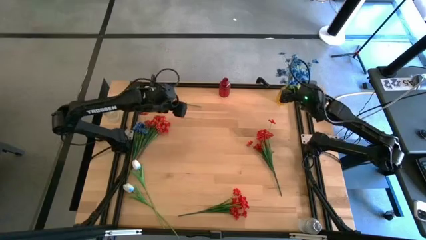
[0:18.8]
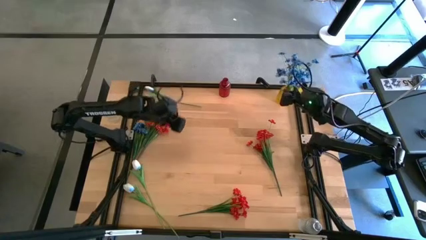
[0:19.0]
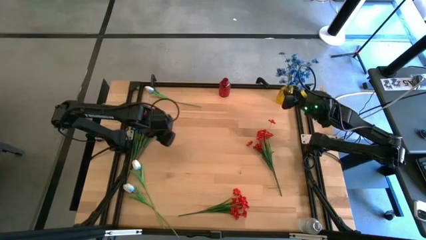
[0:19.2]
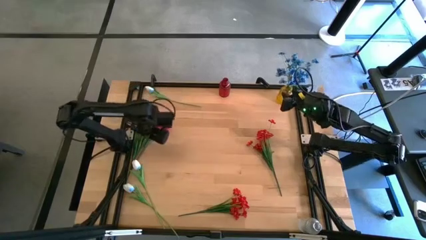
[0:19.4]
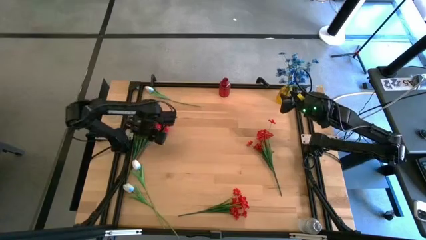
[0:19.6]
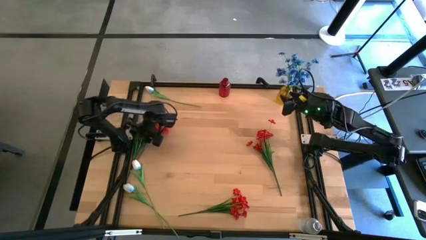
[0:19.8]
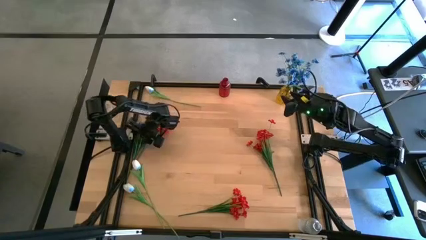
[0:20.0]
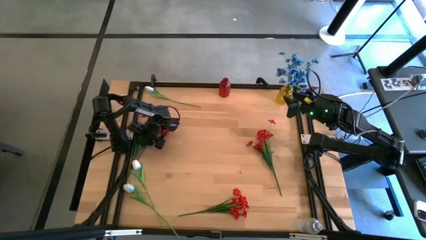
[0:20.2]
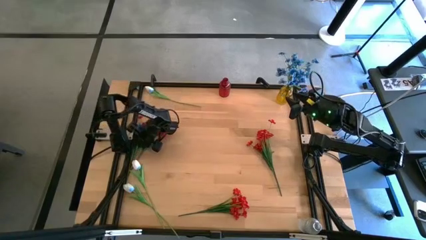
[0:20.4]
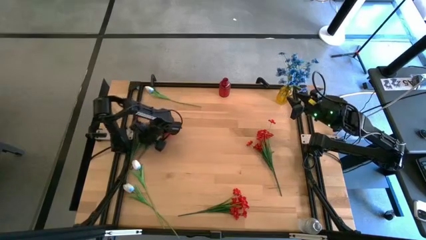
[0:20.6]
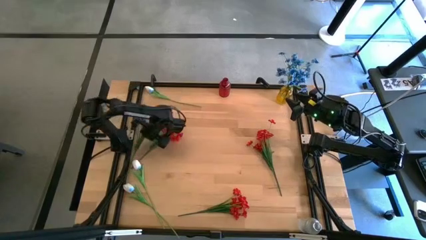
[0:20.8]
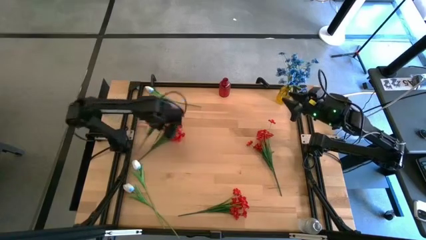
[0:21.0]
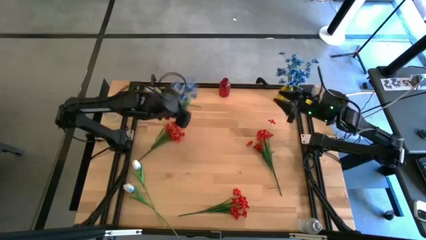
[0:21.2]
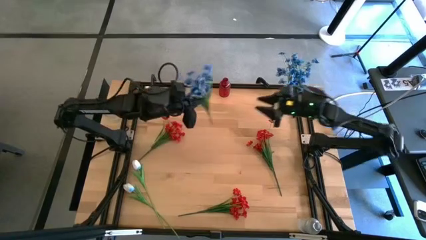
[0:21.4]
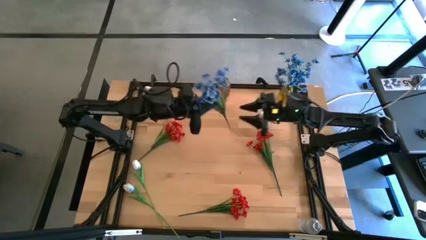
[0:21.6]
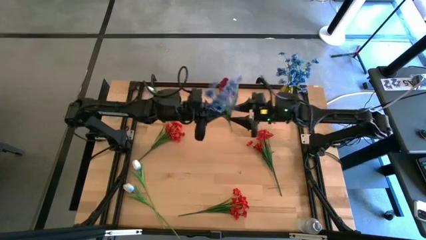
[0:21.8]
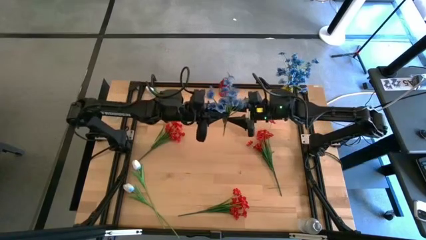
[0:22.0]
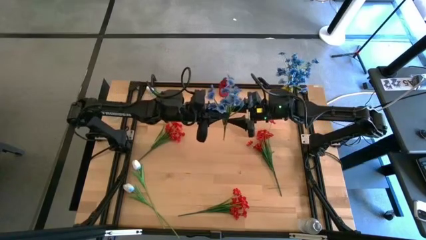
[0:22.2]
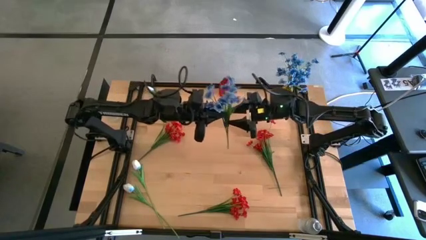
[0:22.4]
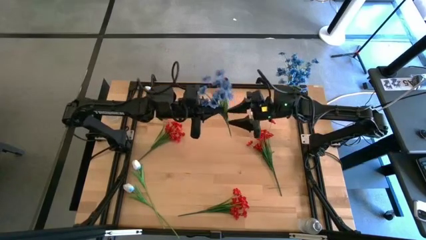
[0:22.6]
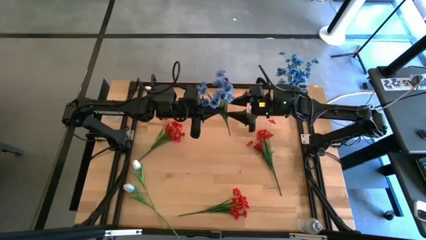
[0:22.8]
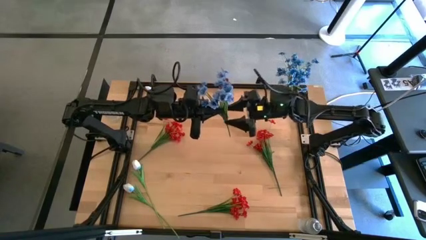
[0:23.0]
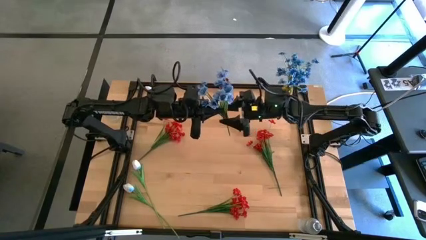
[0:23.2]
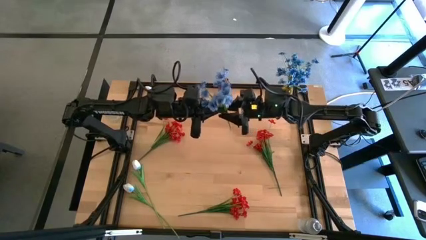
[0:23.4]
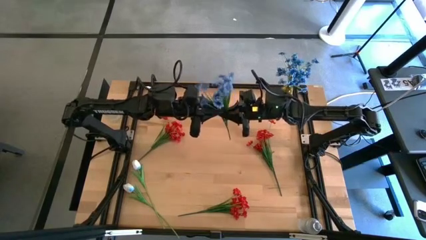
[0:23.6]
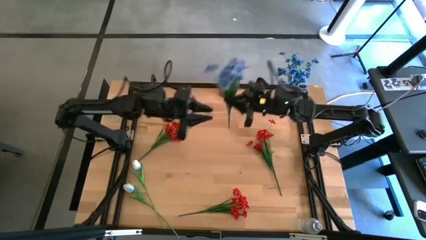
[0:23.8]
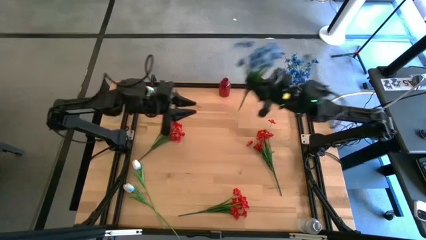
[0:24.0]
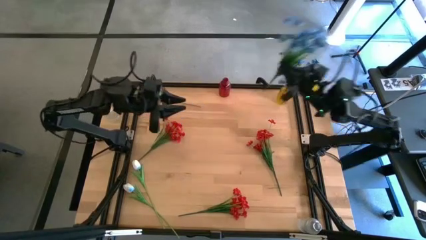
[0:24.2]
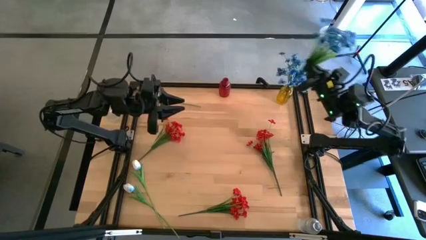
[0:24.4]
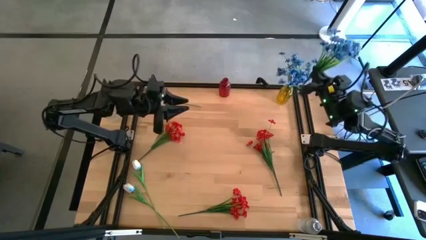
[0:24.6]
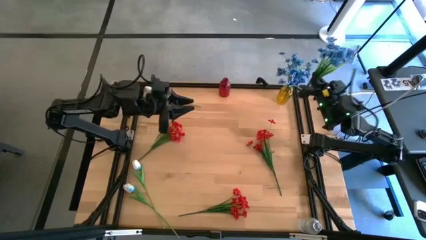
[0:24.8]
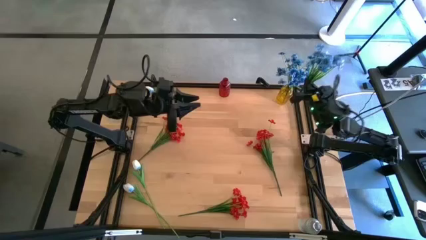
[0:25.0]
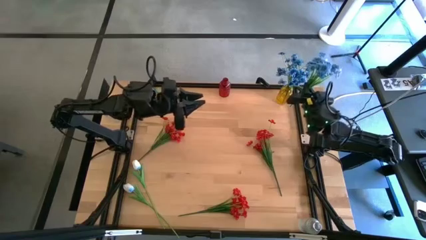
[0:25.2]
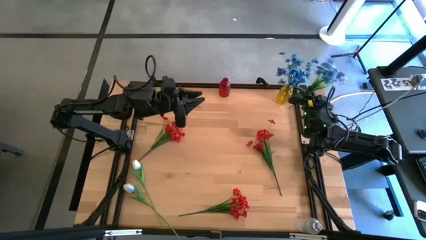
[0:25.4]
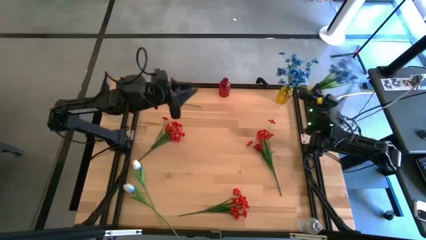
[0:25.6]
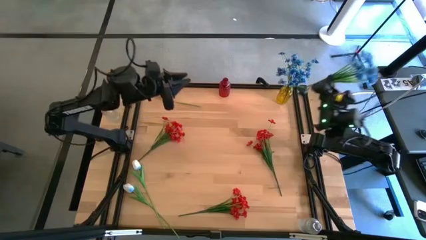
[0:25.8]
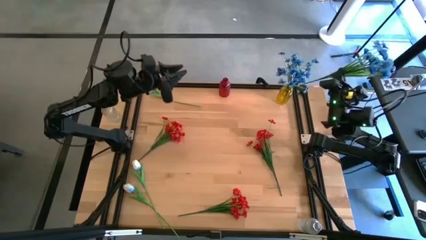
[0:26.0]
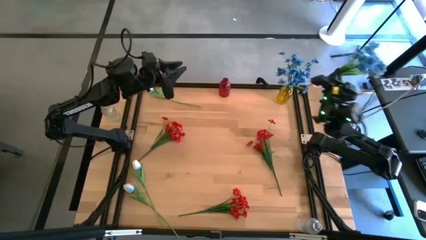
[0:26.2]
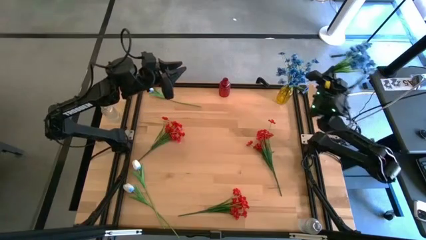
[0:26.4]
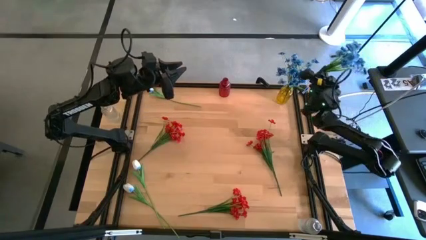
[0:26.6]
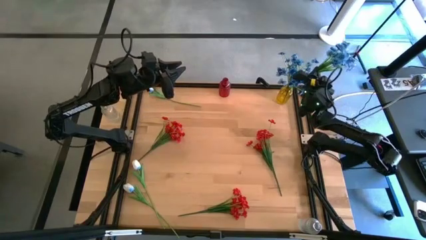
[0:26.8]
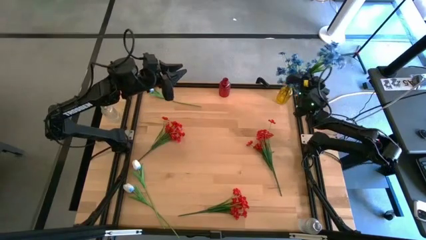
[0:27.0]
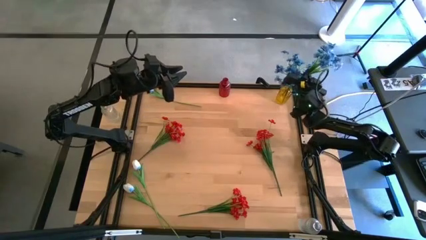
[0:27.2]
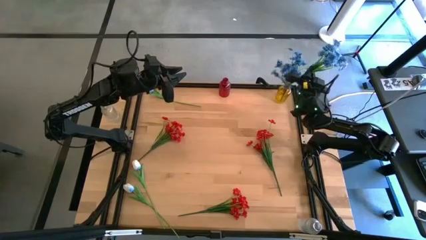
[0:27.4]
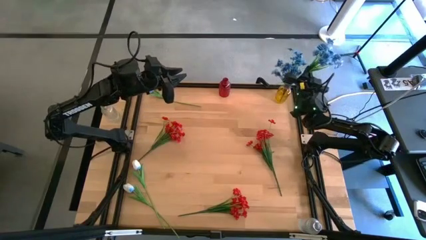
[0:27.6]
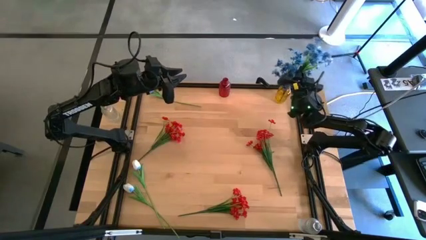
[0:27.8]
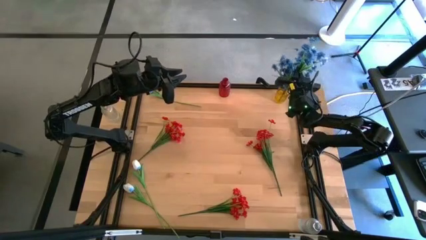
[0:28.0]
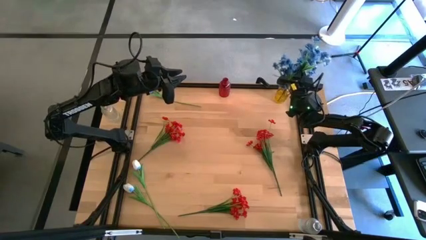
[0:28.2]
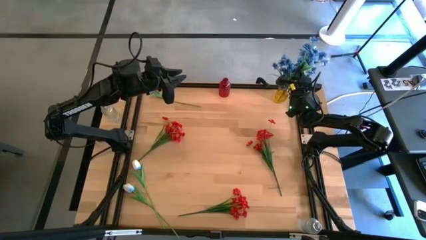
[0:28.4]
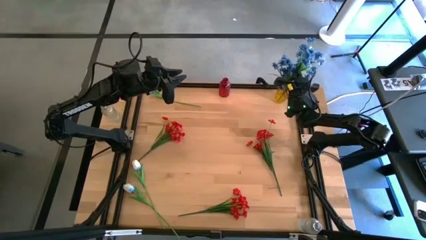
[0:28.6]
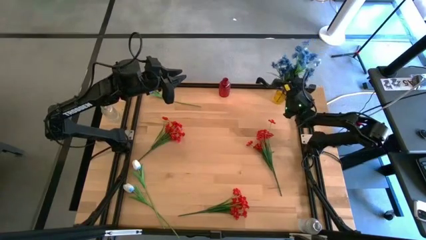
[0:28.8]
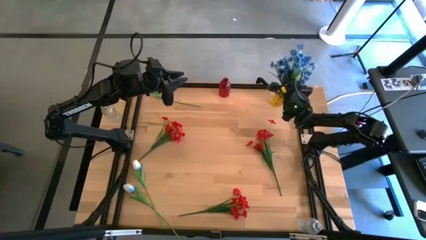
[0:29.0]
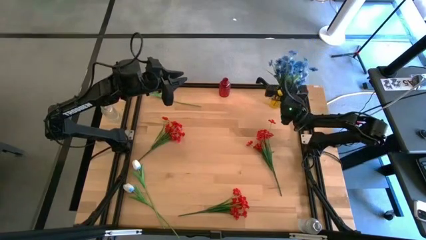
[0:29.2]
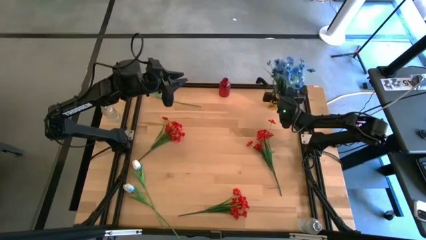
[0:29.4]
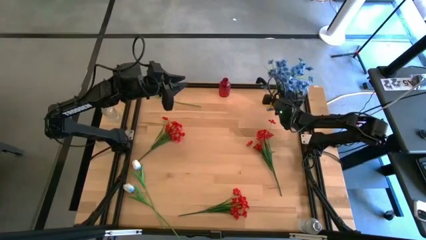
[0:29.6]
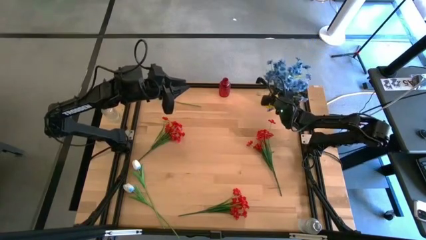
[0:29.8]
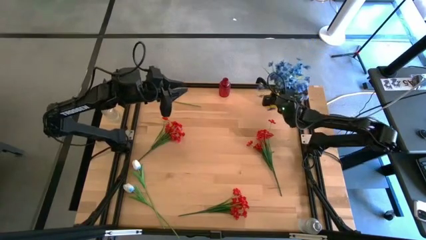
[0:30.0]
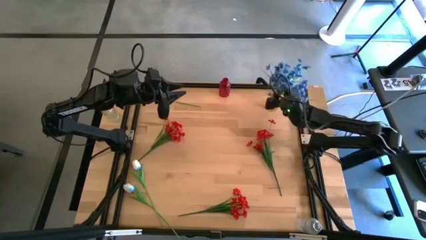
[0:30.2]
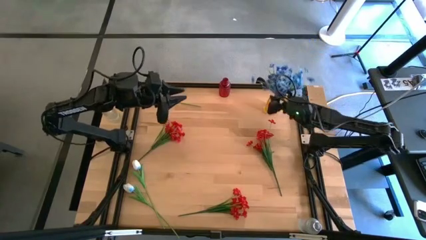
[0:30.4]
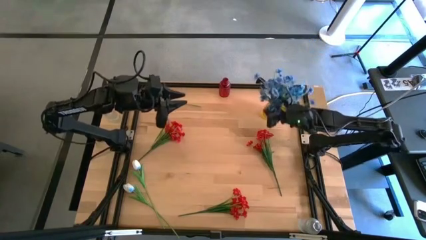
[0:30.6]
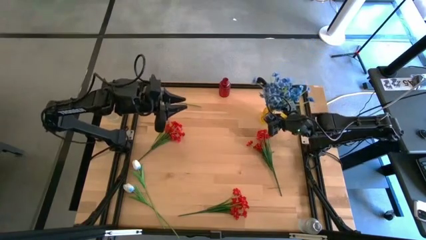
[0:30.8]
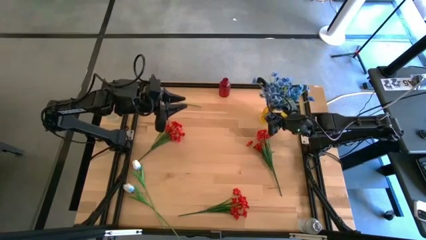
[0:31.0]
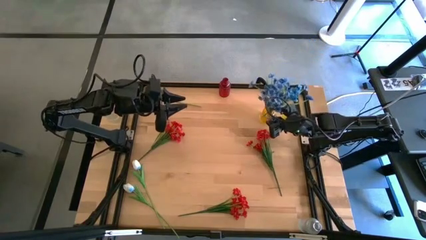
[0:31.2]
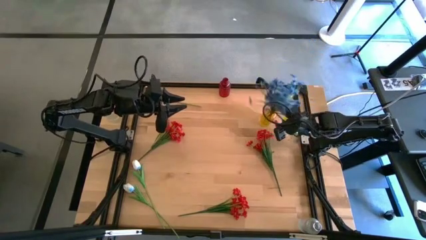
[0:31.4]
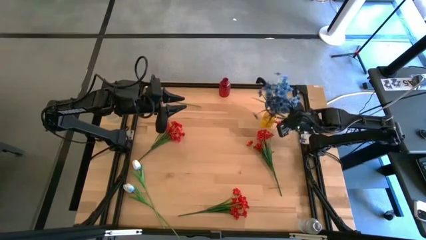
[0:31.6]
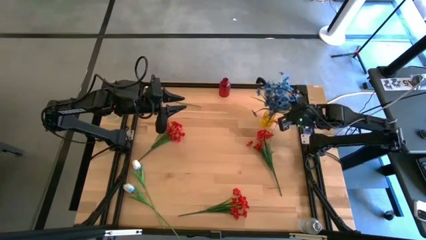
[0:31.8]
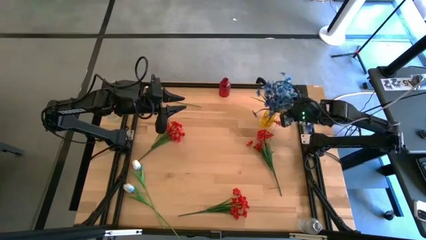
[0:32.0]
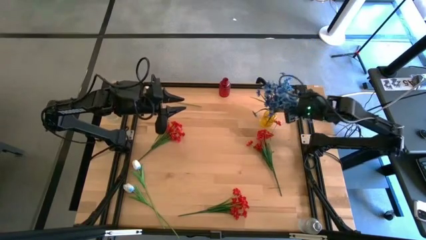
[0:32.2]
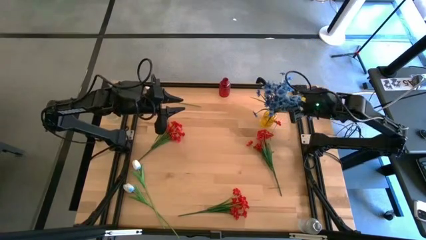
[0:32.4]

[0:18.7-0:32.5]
Task: Sort flowers into vase by color
Put the blue flowers into the yellow vase
